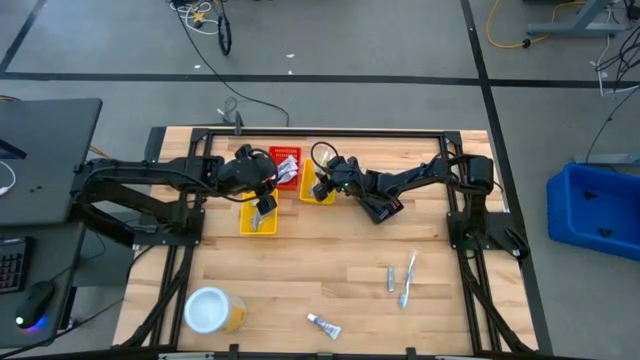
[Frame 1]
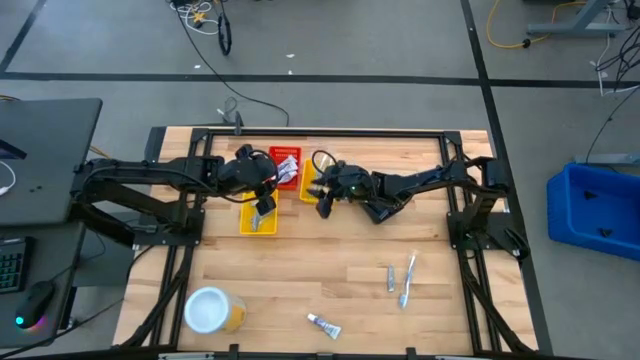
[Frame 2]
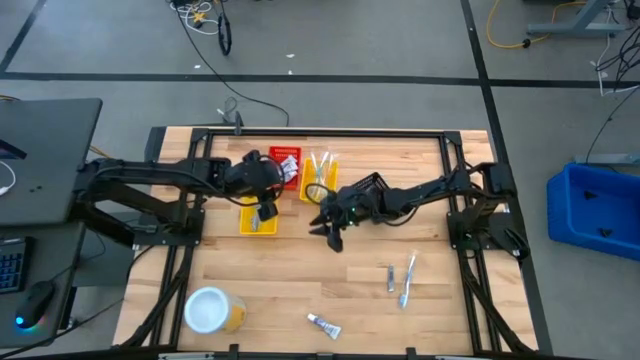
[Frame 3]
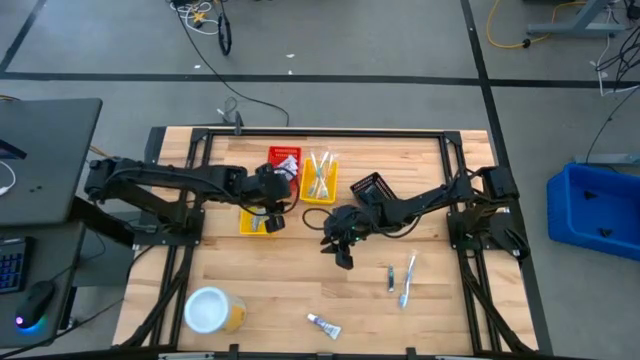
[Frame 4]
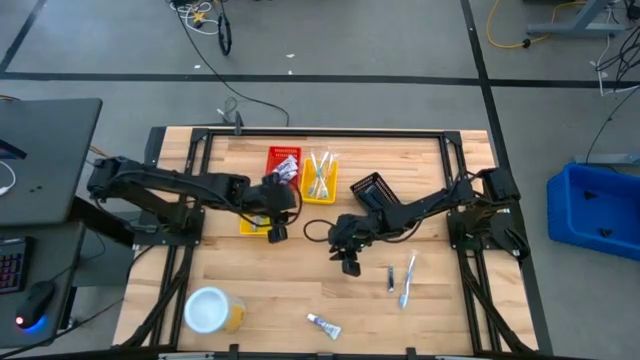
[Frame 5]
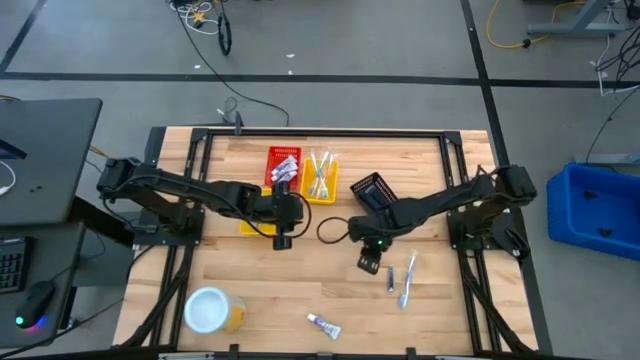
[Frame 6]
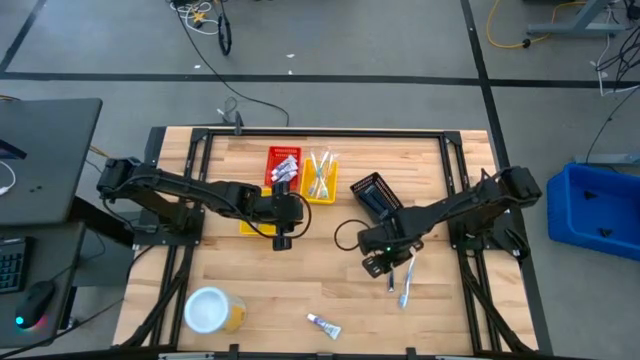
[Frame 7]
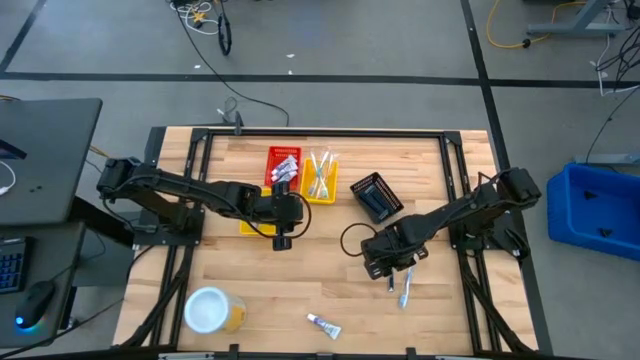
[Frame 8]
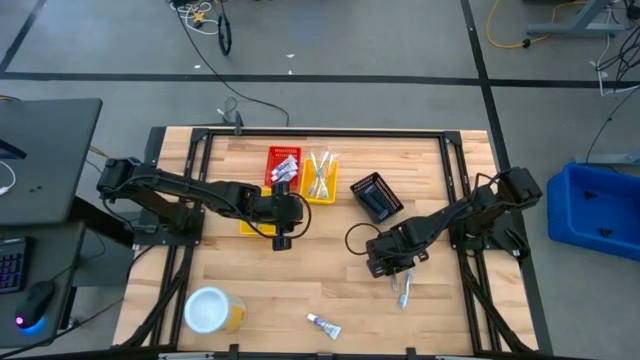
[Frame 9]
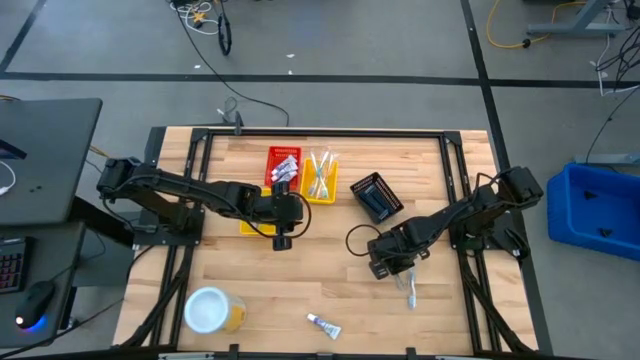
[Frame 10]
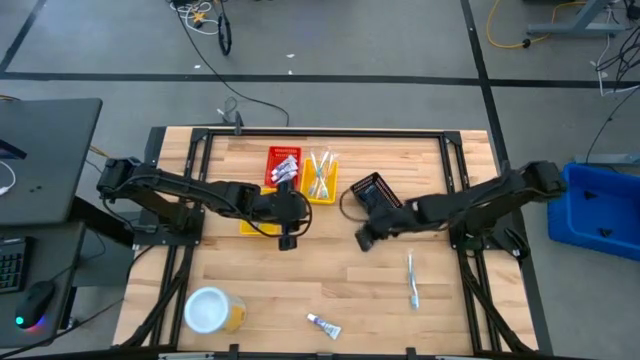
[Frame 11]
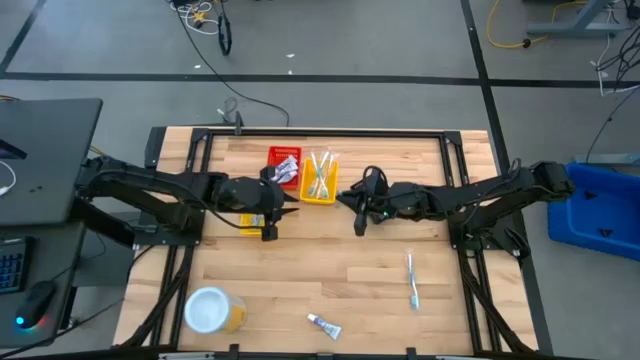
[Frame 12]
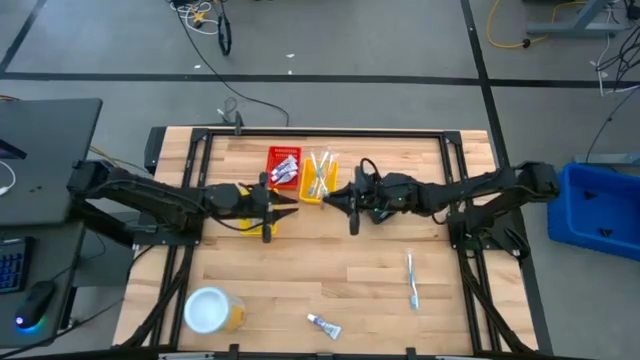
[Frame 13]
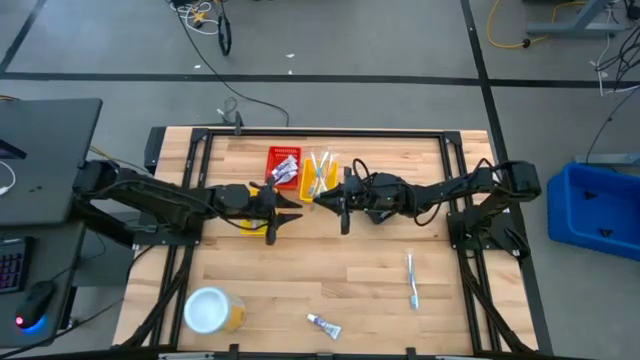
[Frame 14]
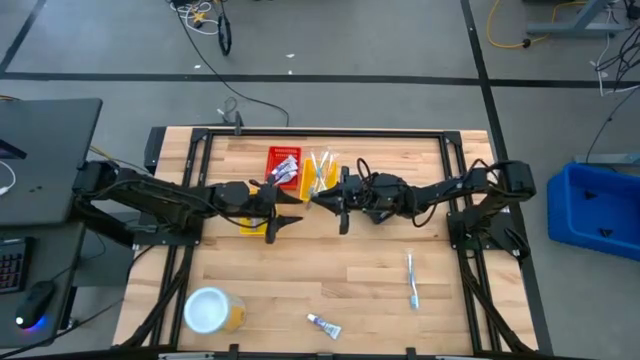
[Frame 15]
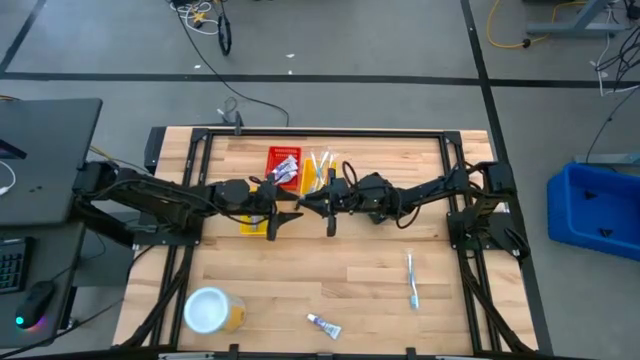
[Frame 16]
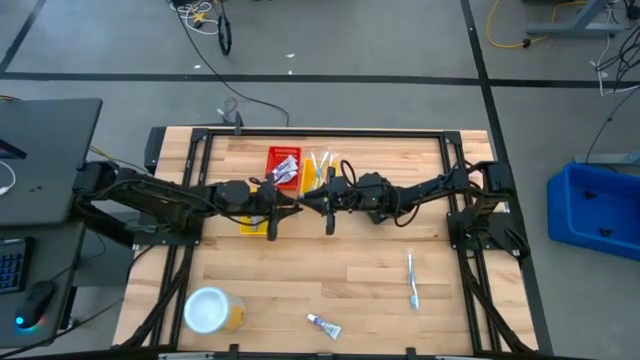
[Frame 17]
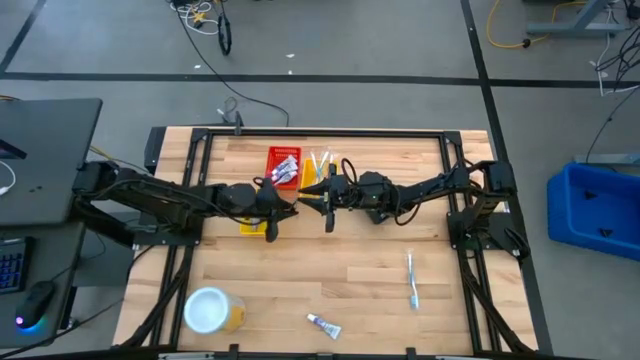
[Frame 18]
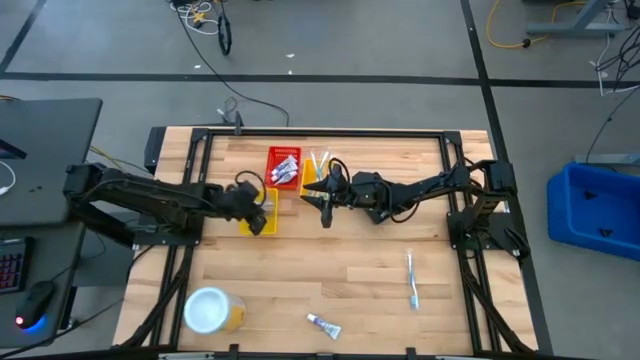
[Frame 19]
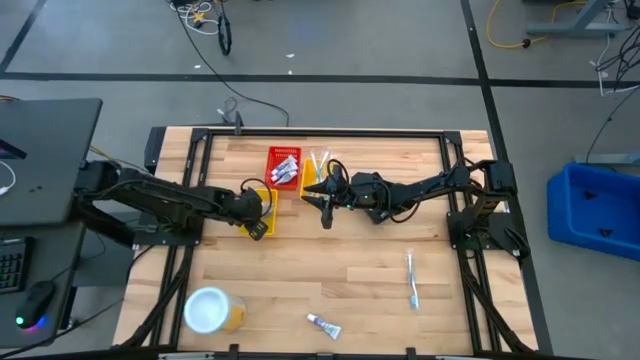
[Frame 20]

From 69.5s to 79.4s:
Task: Pick & Place Travel size toiletries
Put the nail cutter into the left yellow bin

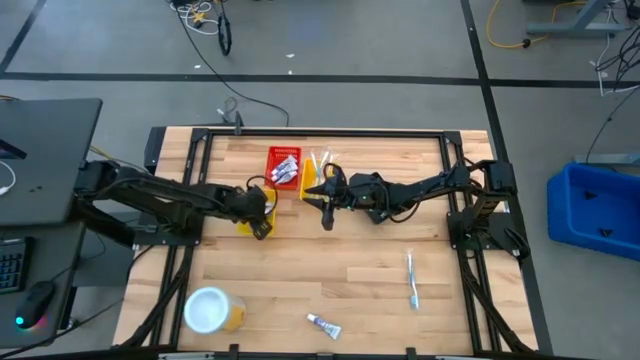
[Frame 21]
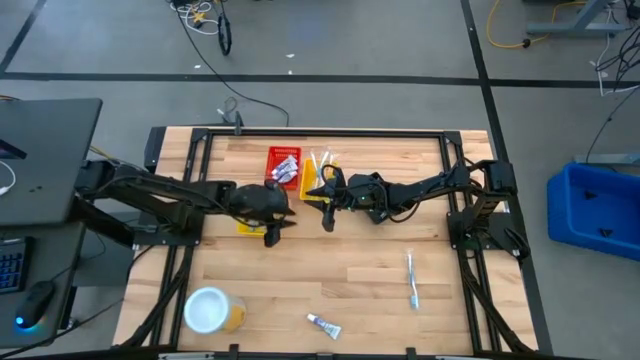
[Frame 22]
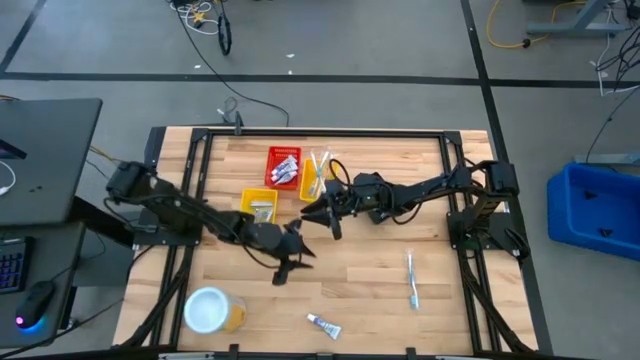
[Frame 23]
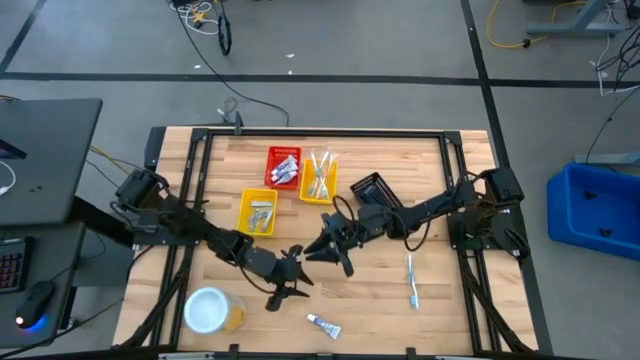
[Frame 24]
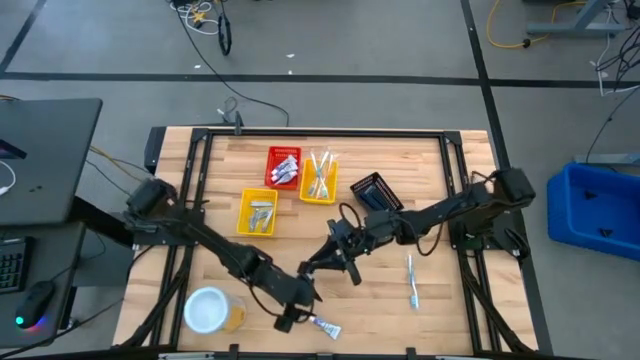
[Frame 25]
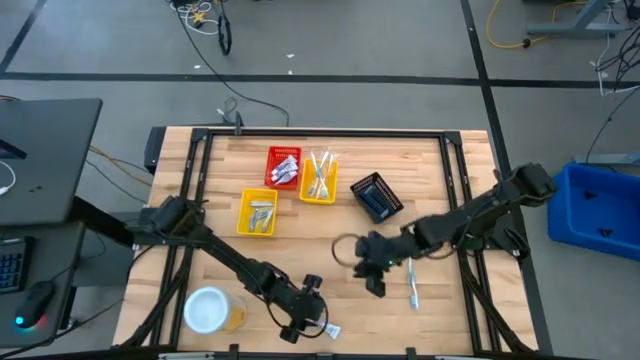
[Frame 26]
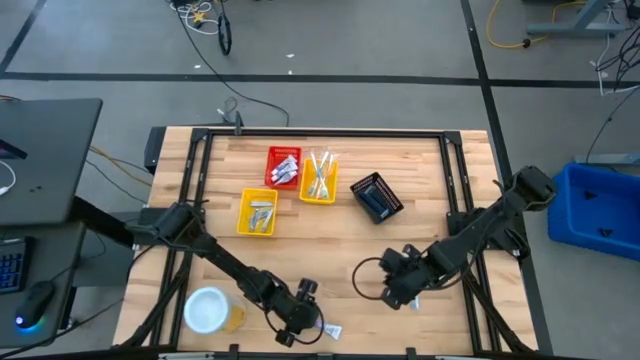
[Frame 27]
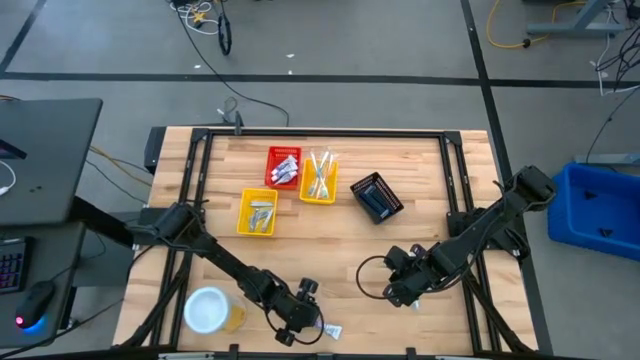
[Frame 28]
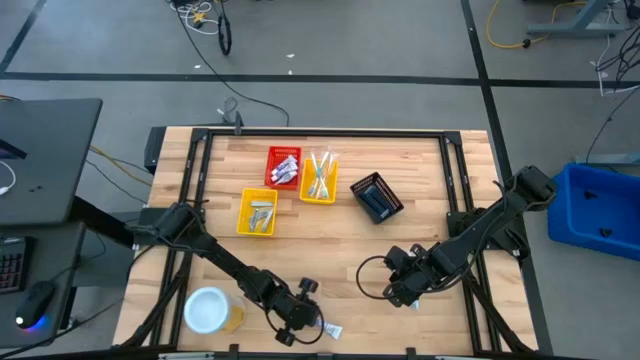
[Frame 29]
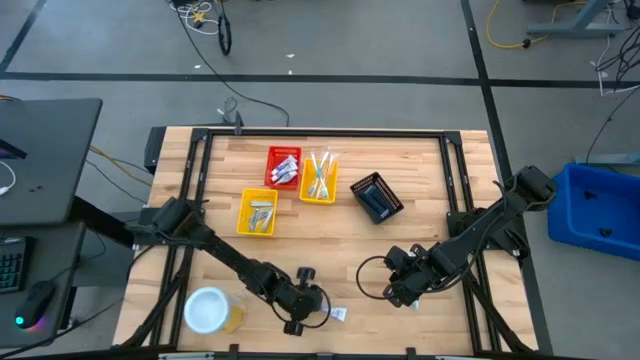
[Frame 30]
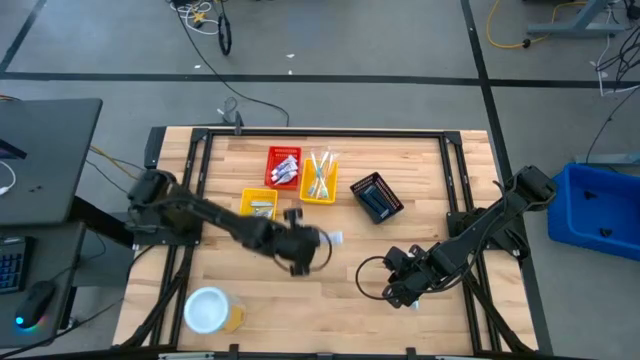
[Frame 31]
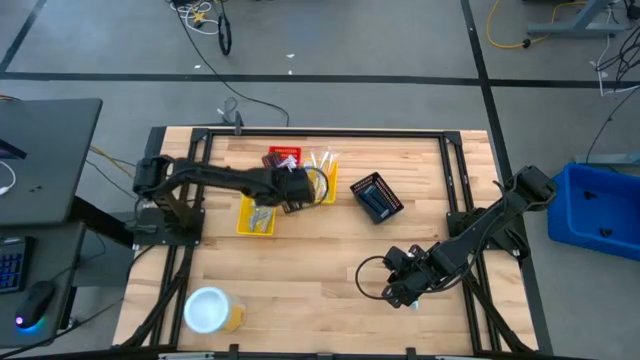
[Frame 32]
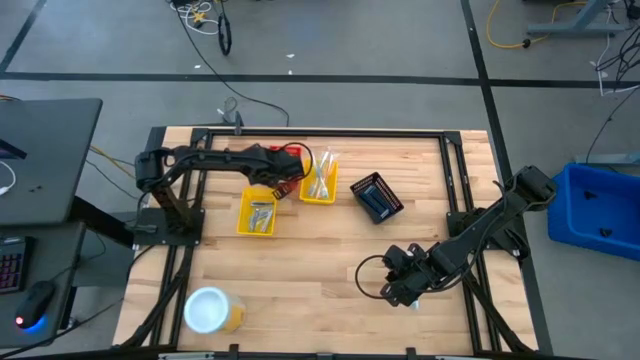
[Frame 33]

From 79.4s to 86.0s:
Put the toothpaste into the red bin

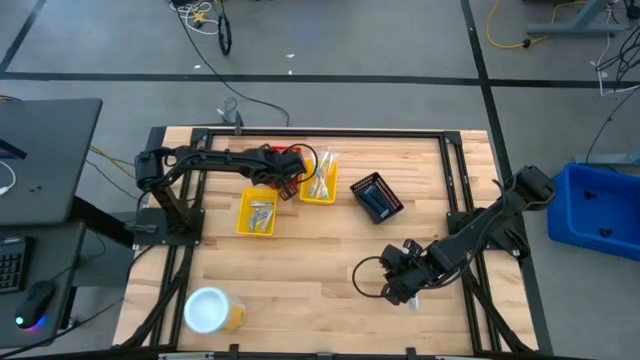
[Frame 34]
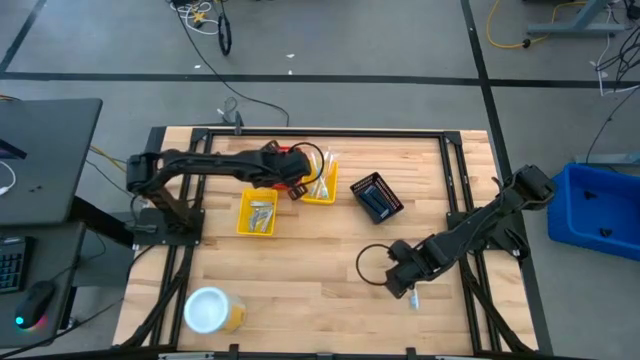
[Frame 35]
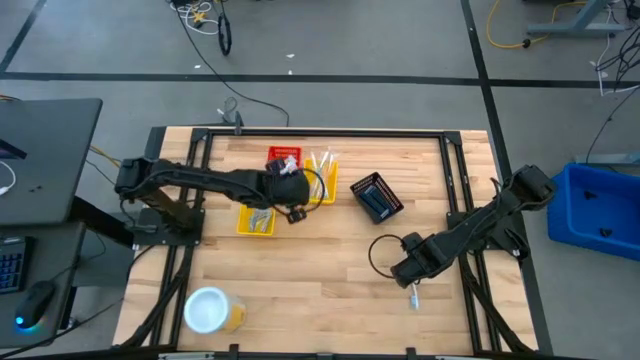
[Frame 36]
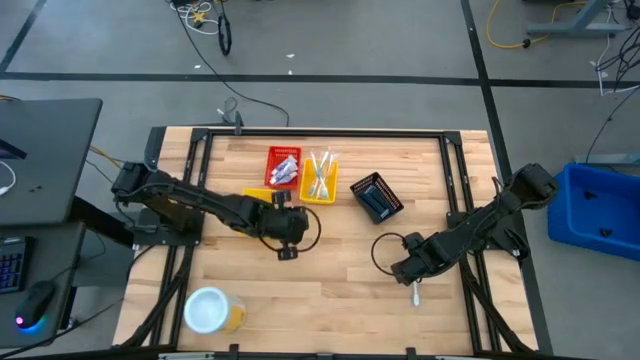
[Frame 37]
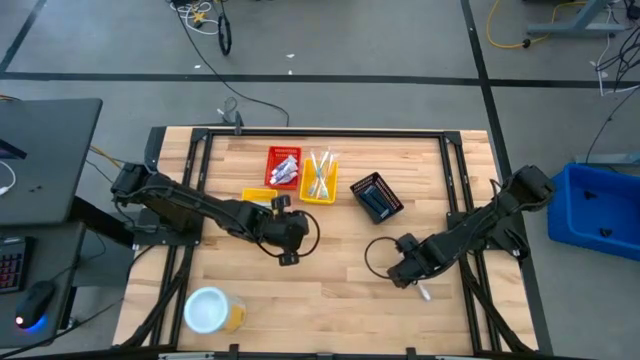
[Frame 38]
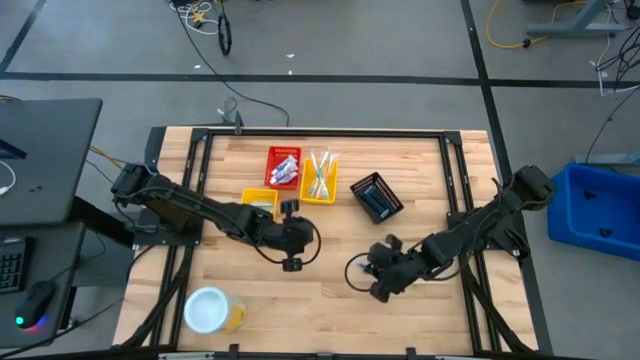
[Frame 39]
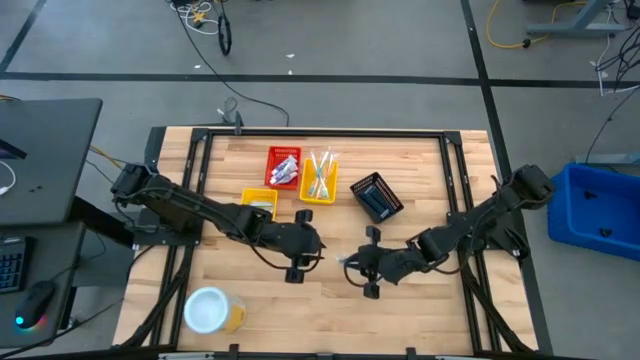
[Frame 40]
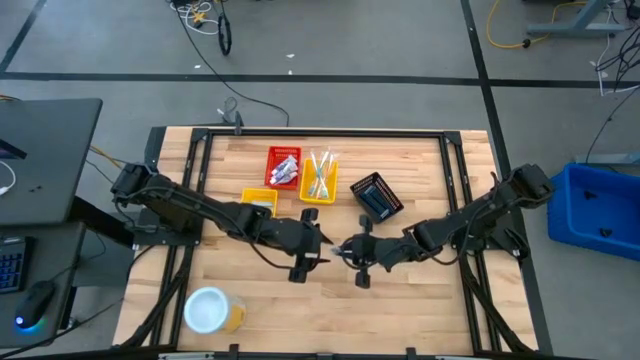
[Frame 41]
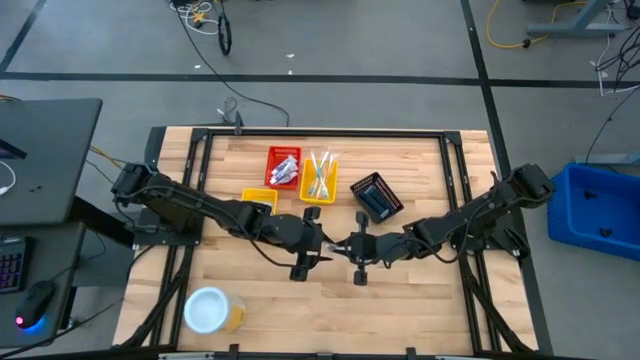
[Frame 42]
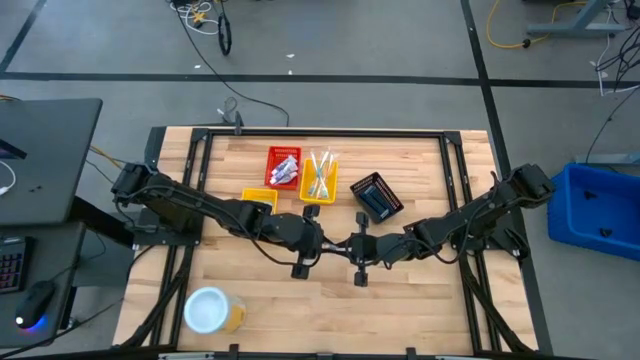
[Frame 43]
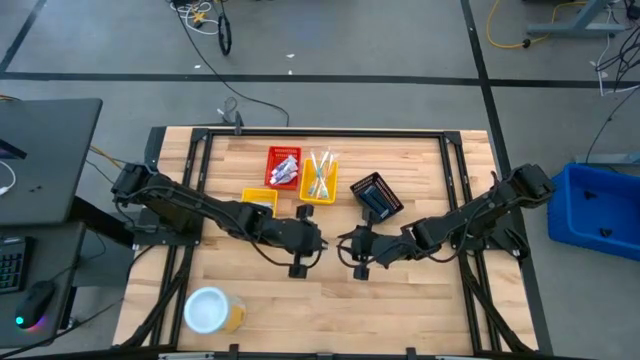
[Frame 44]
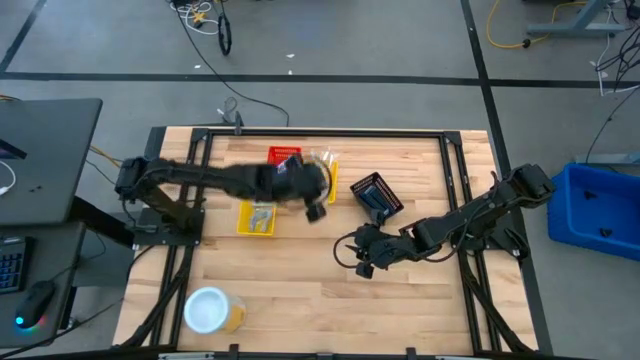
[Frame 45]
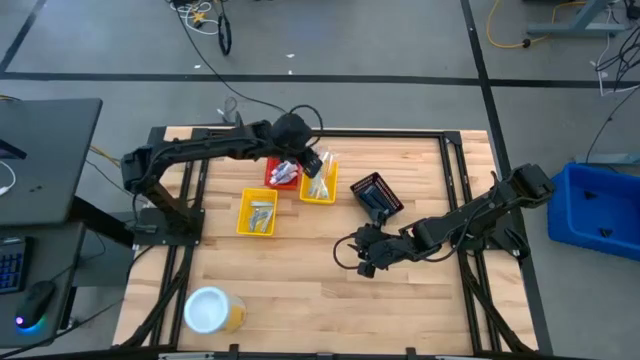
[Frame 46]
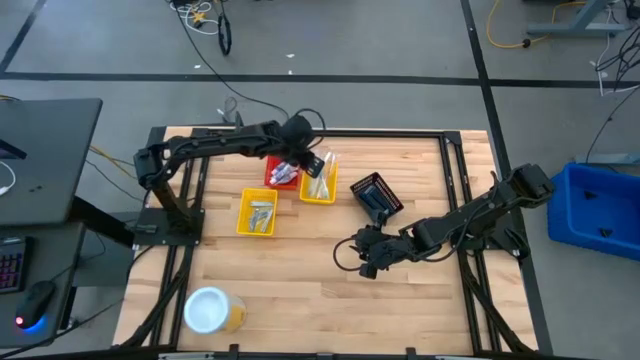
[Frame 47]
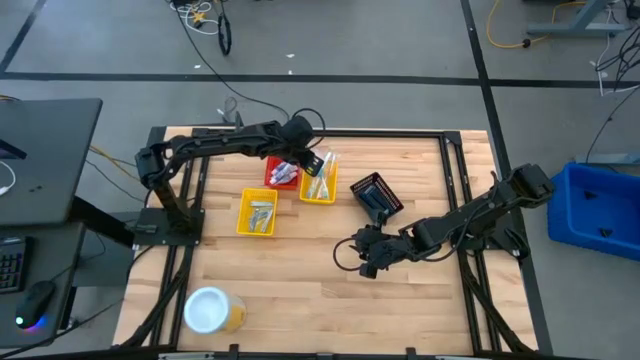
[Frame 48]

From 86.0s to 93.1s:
Put the blue toothbrush into the right yellow bin
